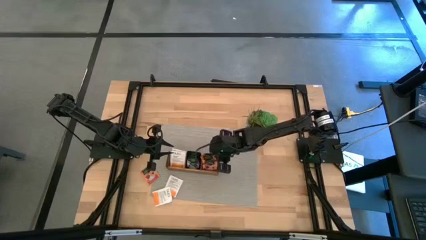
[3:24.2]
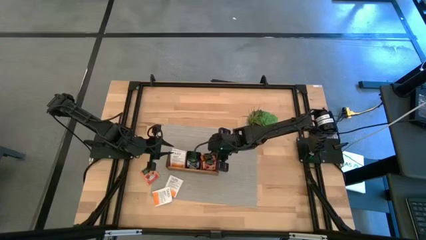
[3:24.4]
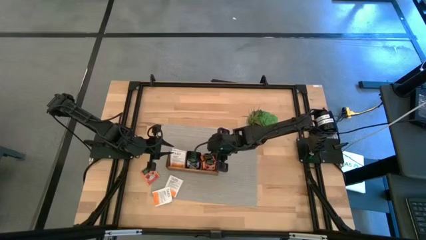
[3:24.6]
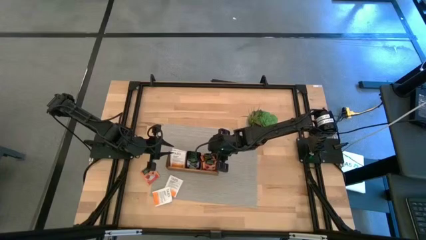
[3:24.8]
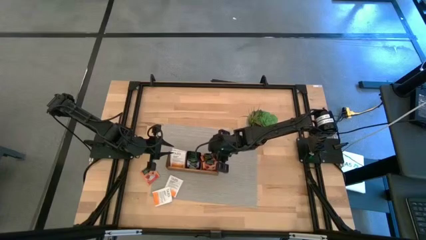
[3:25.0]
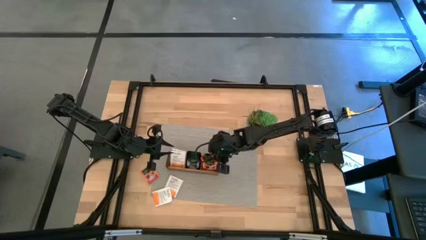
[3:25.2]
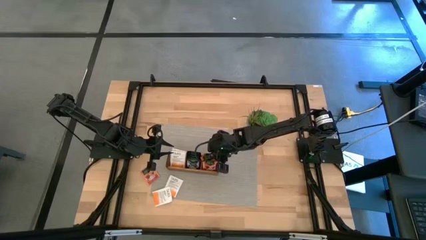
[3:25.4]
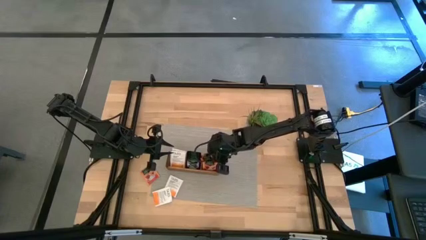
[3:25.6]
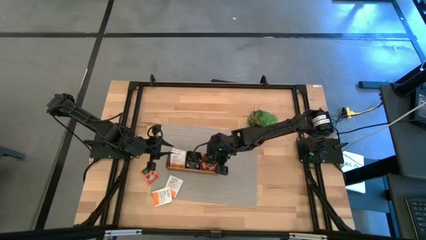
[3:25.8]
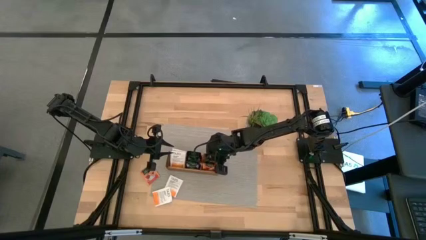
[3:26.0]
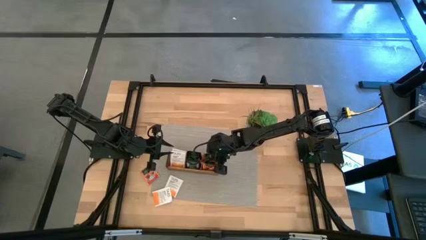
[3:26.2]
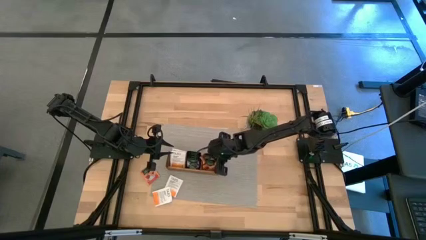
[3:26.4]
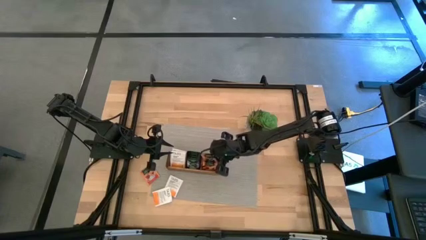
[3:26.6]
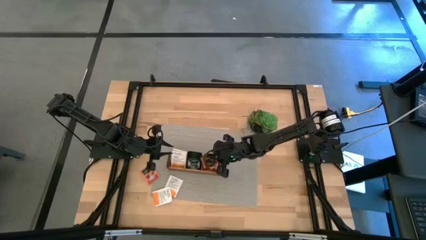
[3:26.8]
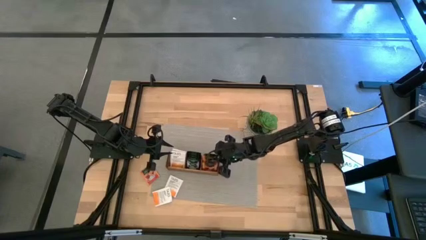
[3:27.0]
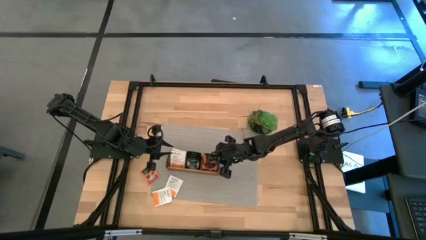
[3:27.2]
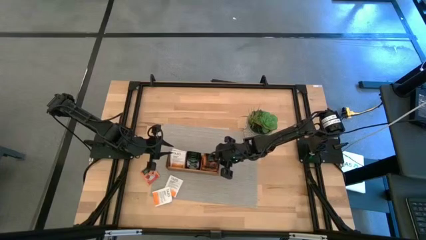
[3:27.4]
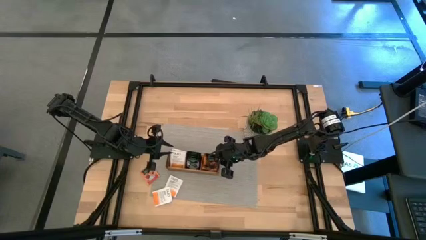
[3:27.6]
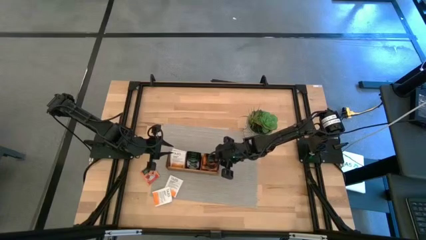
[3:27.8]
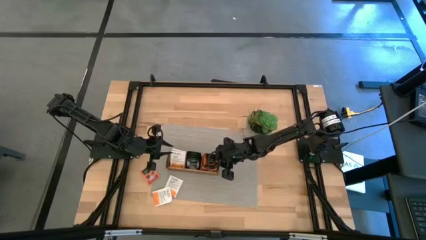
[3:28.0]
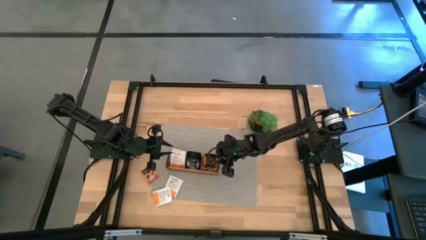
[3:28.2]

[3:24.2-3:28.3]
Task: Pick & Place Tea
Adjust the orange tea bag in the right section of the wooden organizer

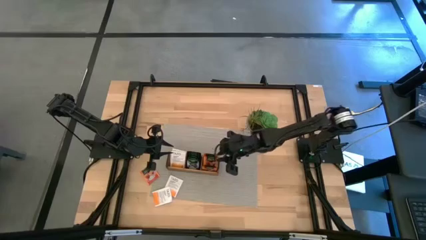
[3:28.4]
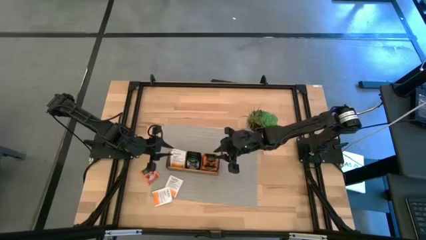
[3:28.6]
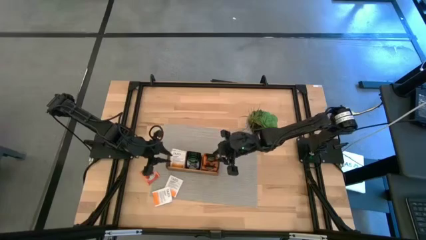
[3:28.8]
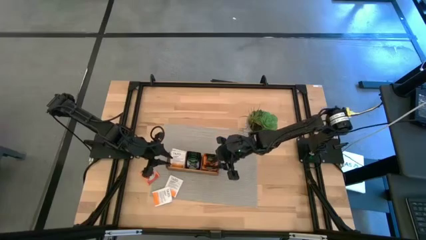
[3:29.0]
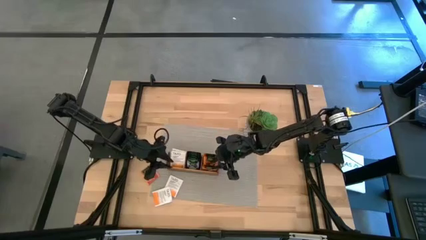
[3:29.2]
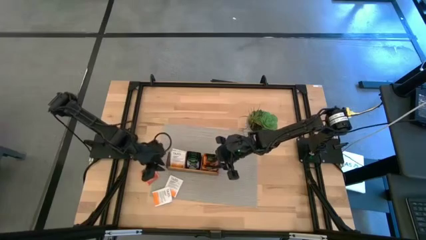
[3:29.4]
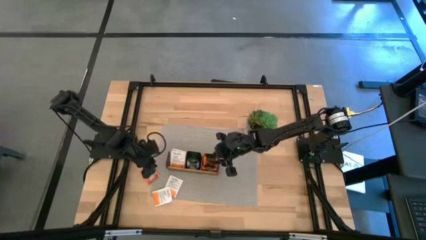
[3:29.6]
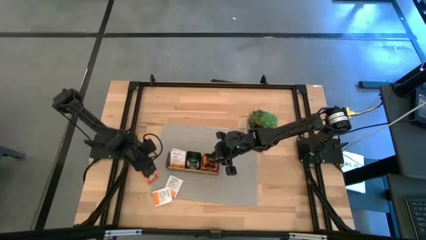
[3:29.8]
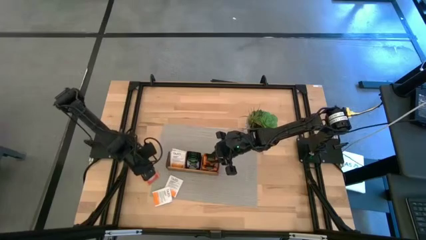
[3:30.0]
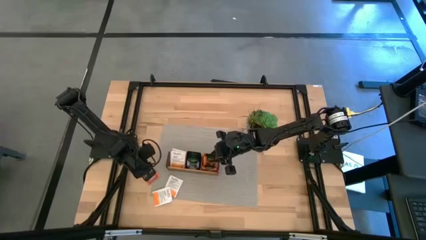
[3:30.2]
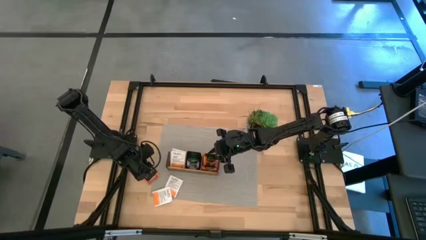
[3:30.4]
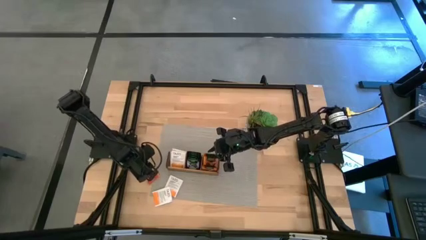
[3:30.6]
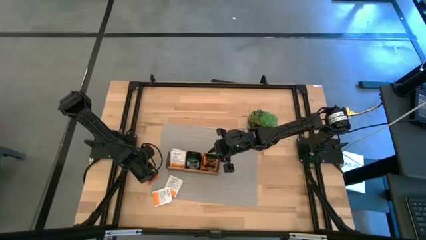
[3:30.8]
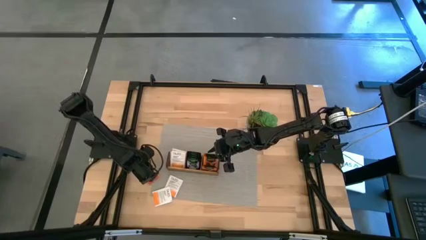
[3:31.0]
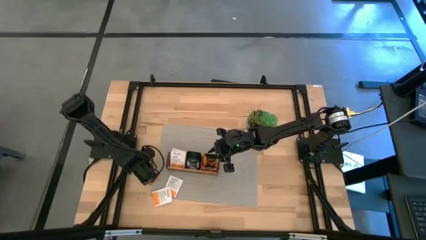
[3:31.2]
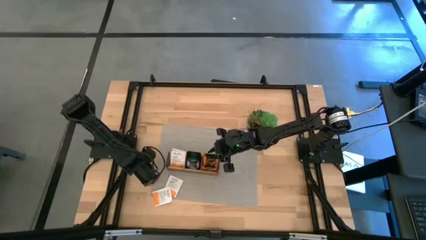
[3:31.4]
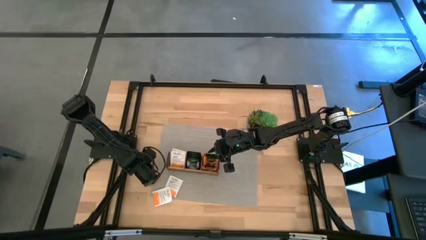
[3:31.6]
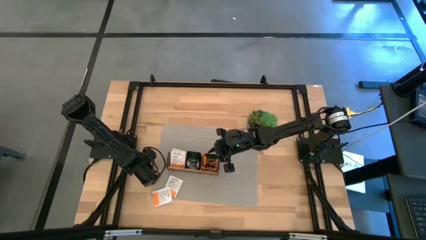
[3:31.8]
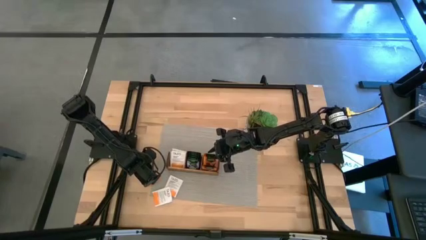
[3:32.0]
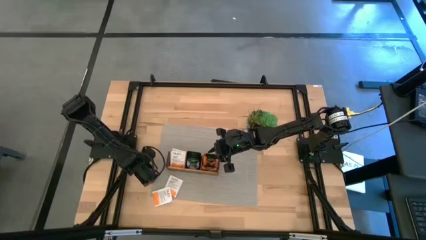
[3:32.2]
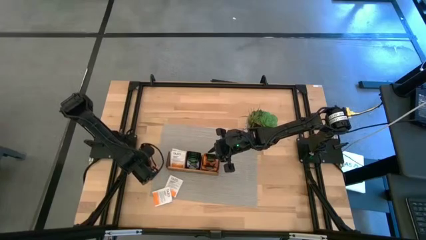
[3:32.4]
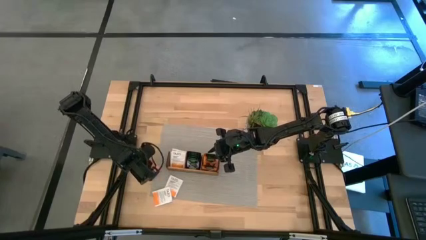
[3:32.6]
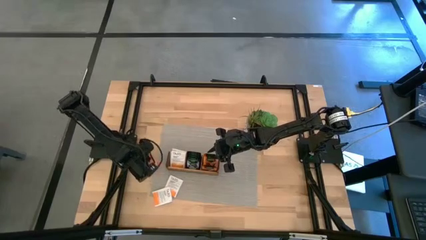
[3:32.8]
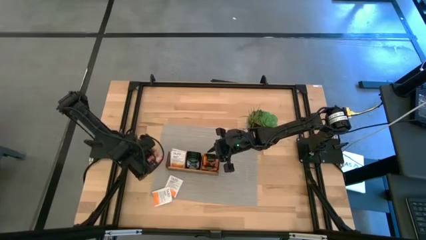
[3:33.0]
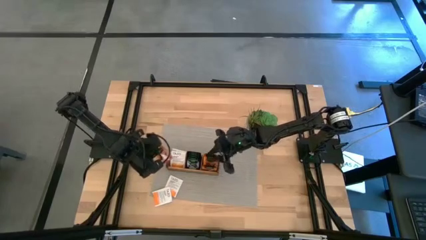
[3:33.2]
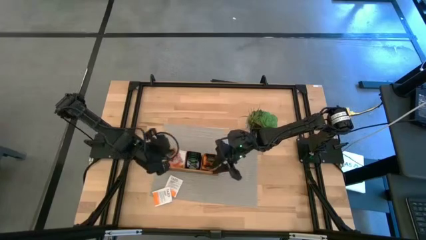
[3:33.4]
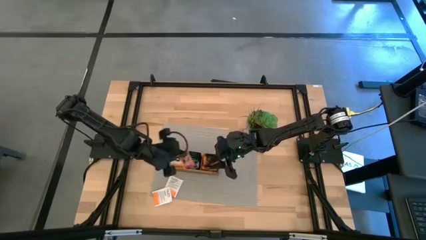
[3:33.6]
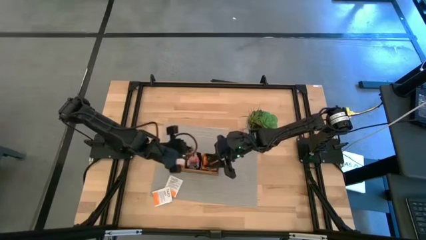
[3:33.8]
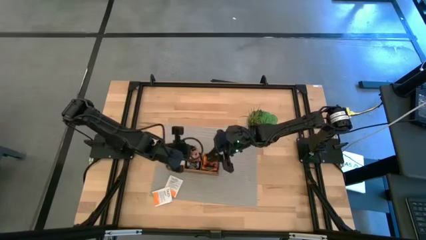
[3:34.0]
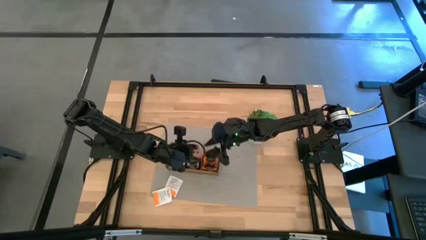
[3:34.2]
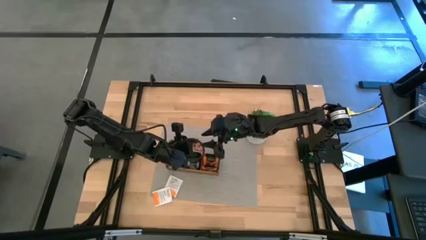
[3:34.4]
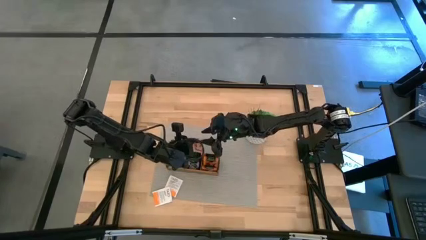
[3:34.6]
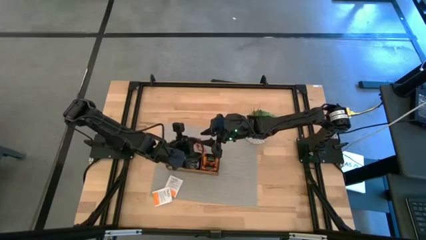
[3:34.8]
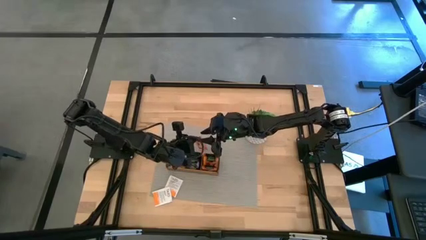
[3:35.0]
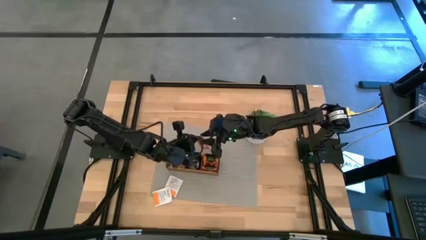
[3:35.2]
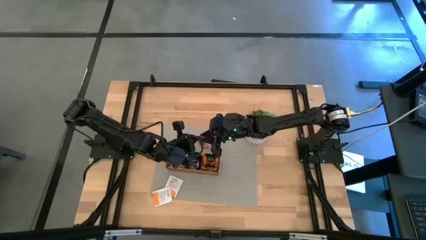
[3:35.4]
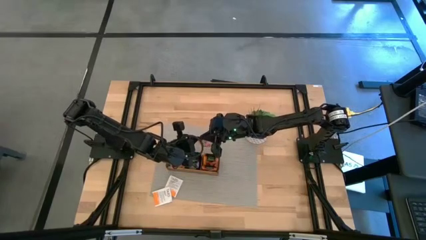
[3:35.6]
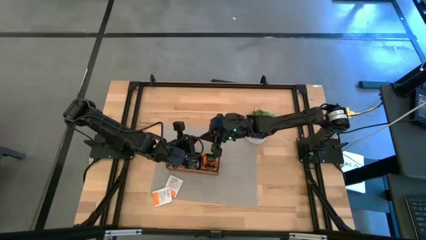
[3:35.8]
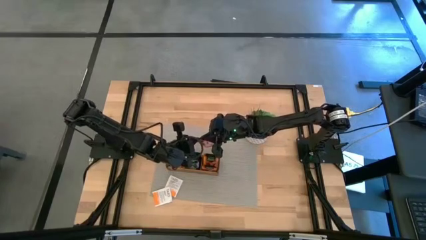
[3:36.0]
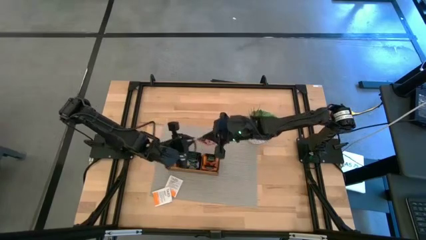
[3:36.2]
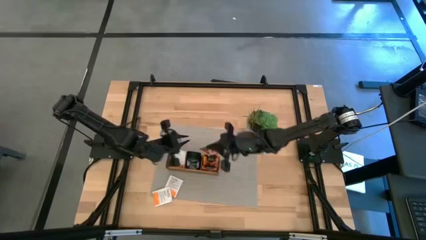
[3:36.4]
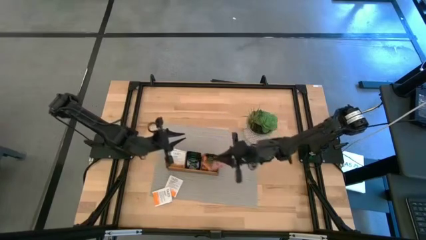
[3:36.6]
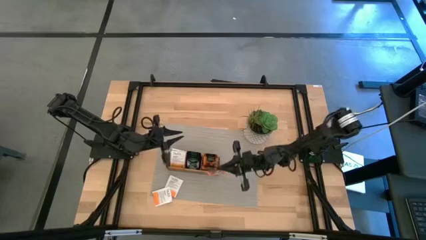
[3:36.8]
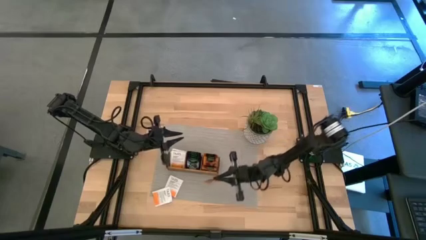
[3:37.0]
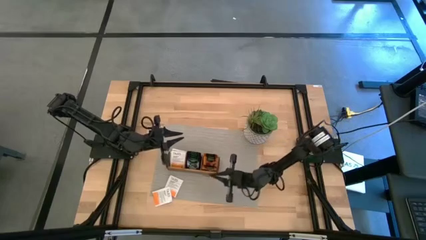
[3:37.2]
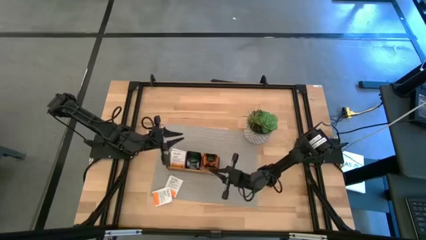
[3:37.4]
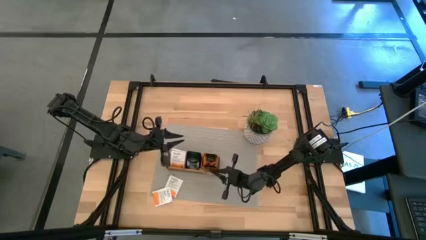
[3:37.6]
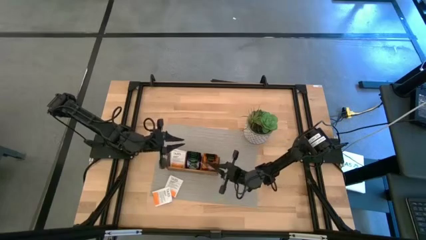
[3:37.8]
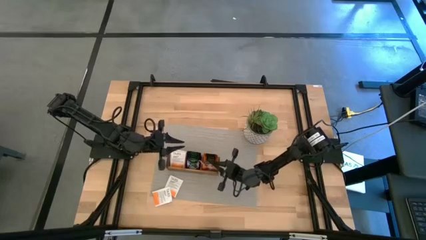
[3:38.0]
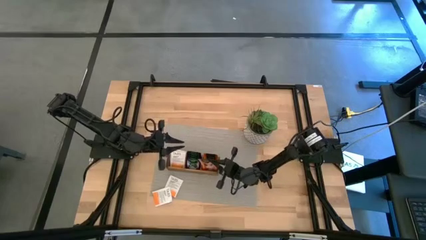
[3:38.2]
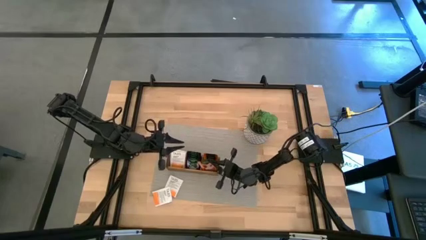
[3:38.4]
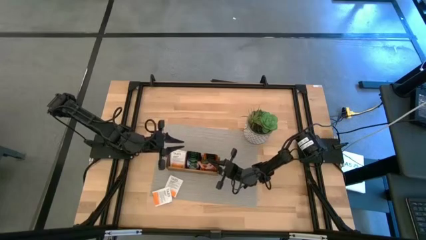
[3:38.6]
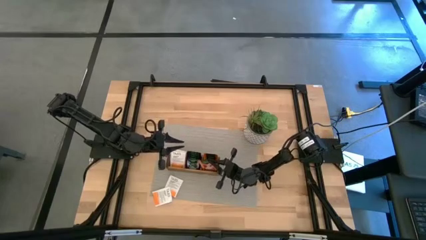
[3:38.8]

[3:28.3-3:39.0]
Put the orange tea bag into the right section of the wooden organizer

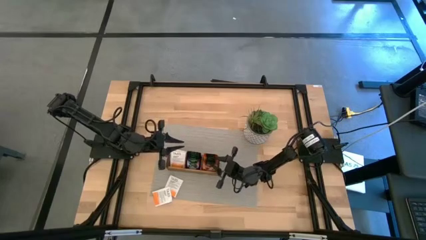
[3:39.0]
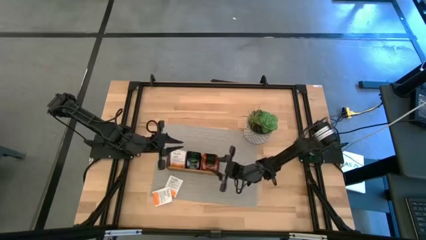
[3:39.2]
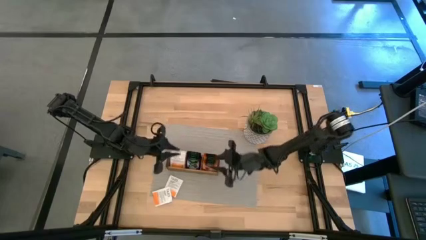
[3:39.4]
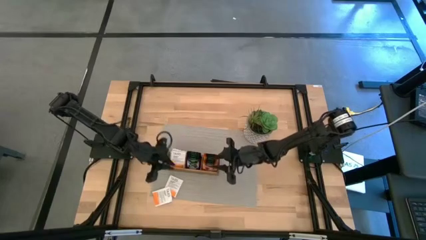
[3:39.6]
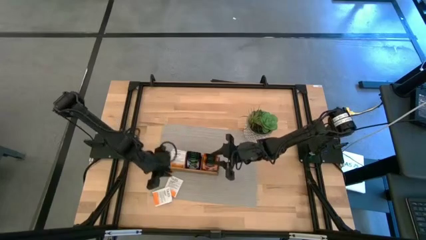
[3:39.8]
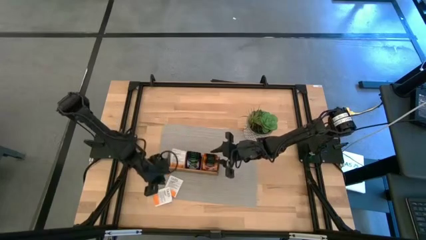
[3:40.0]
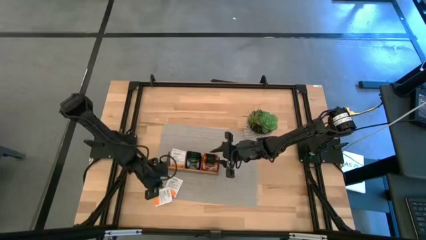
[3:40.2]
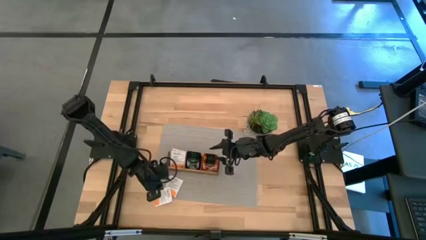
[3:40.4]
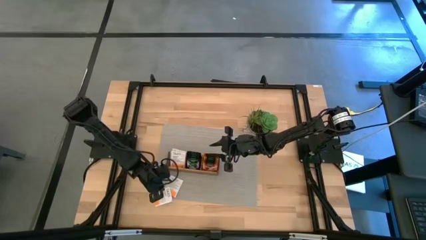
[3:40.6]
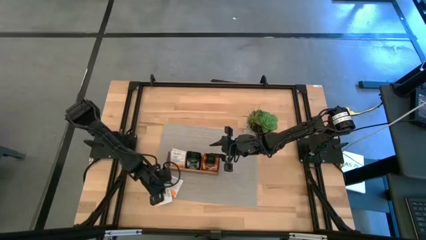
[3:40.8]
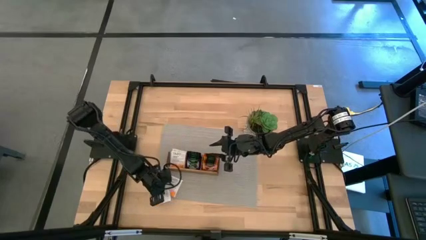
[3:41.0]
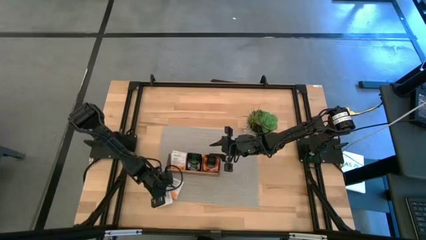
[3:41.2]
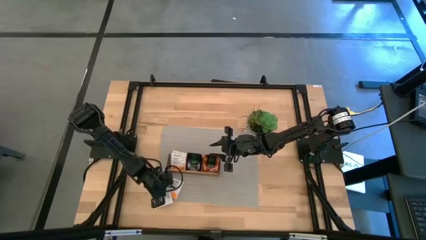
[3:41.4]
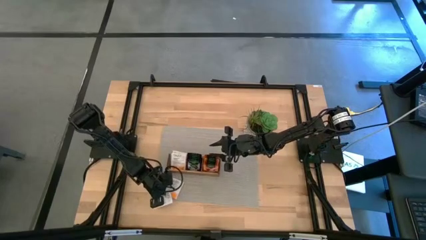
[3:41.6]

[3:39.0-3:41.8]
Put the white tea bag into the left section of the wooden organizer
